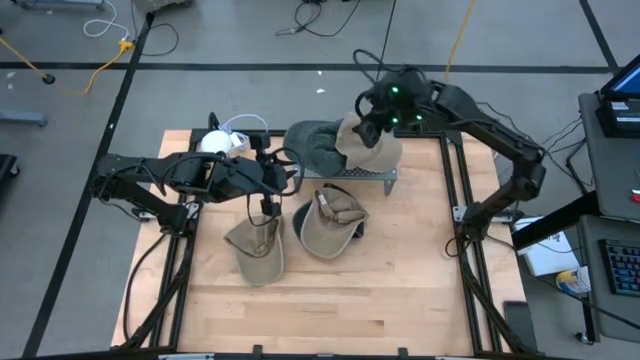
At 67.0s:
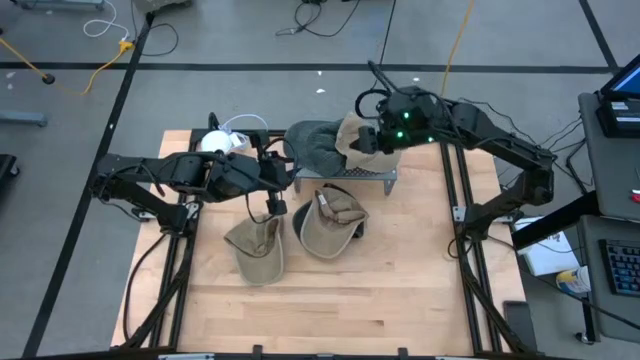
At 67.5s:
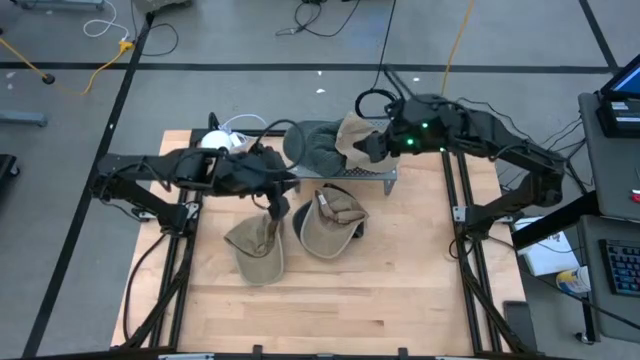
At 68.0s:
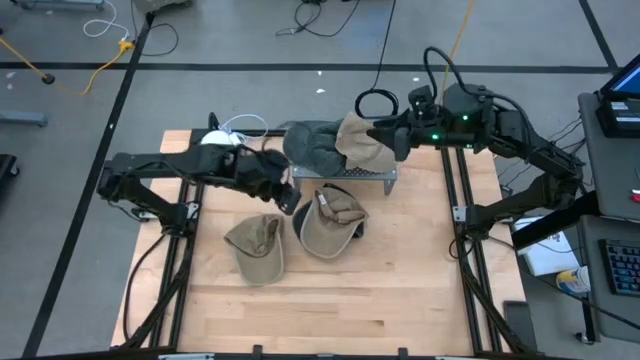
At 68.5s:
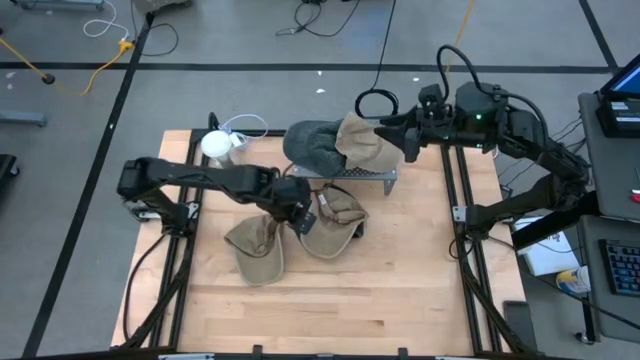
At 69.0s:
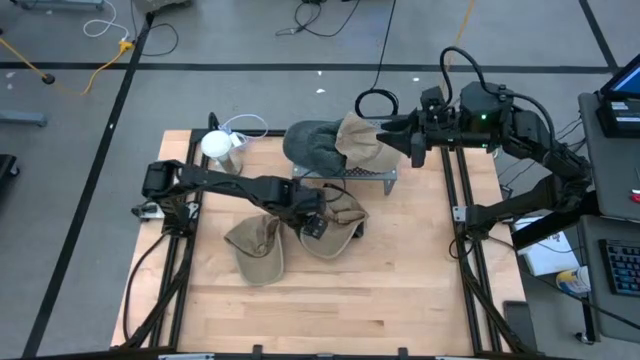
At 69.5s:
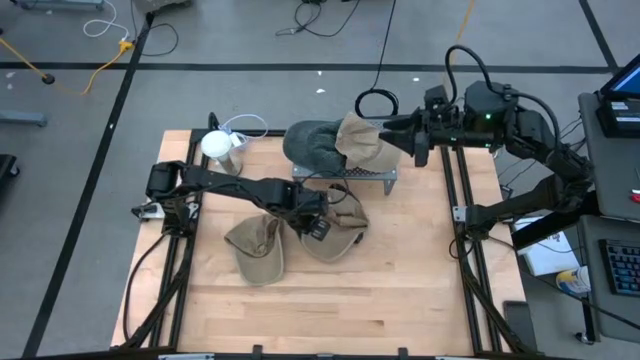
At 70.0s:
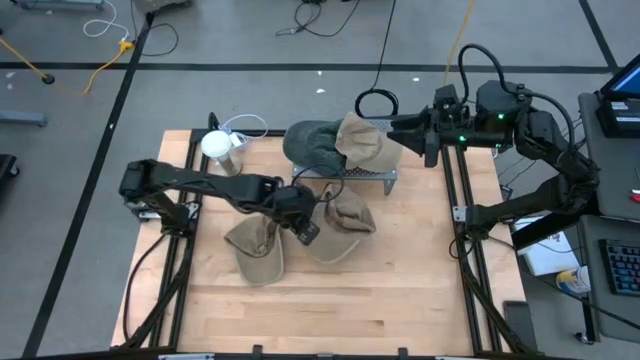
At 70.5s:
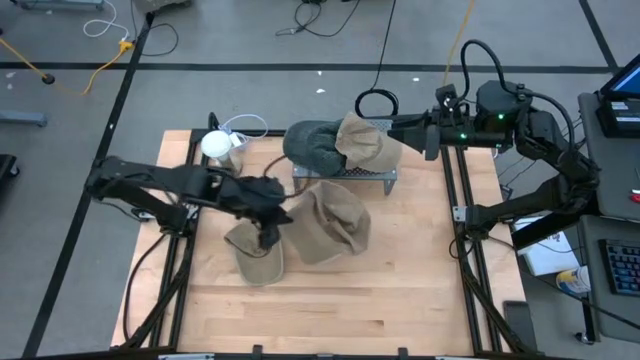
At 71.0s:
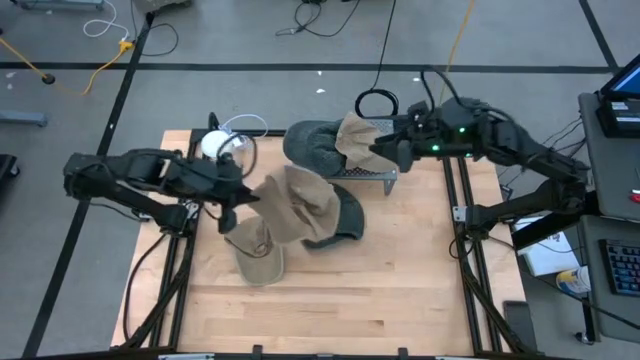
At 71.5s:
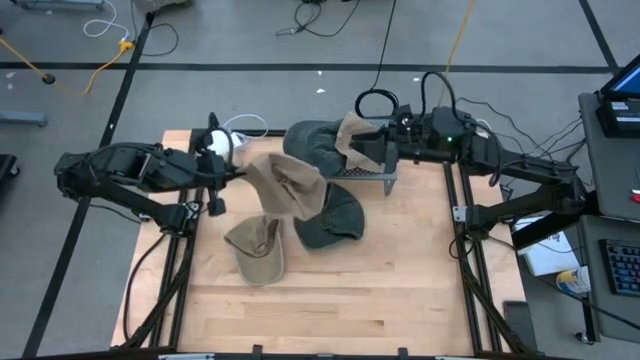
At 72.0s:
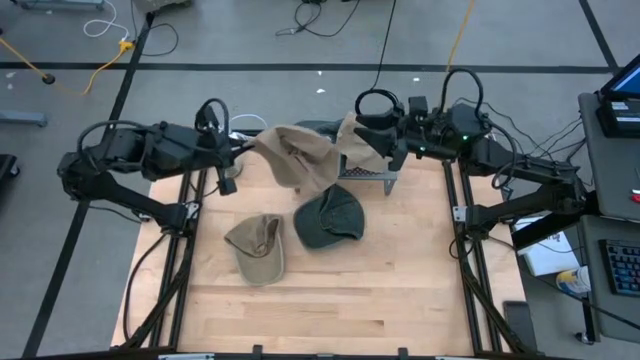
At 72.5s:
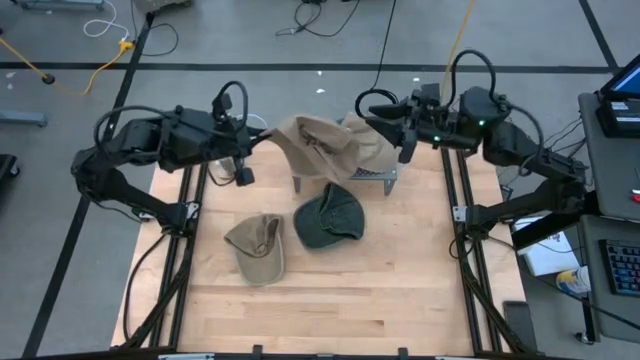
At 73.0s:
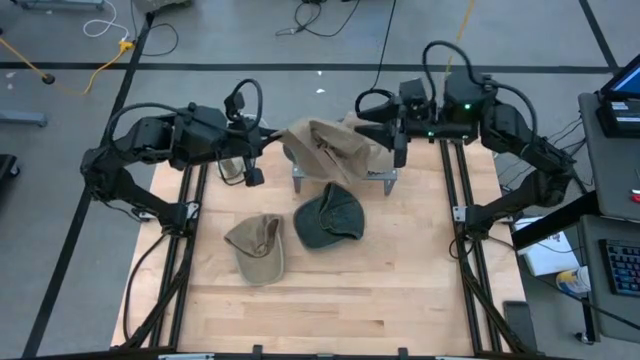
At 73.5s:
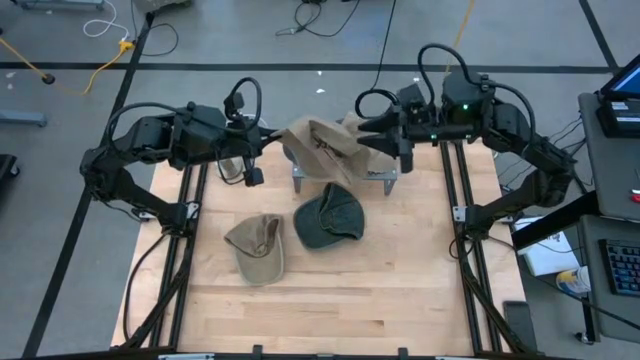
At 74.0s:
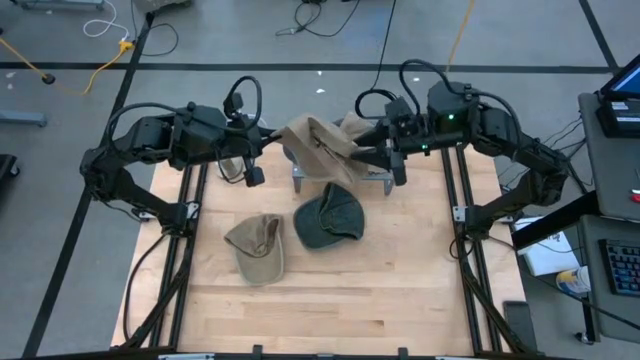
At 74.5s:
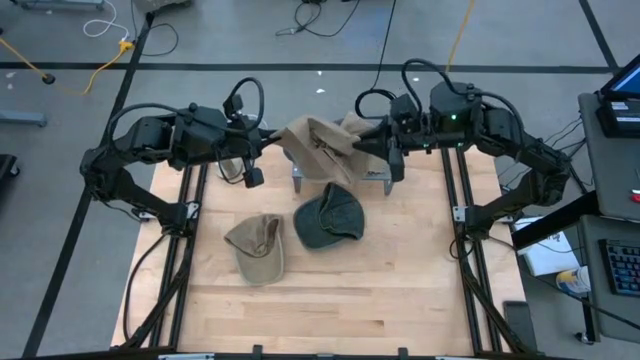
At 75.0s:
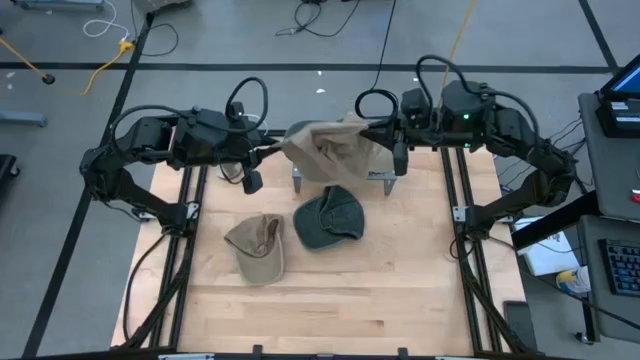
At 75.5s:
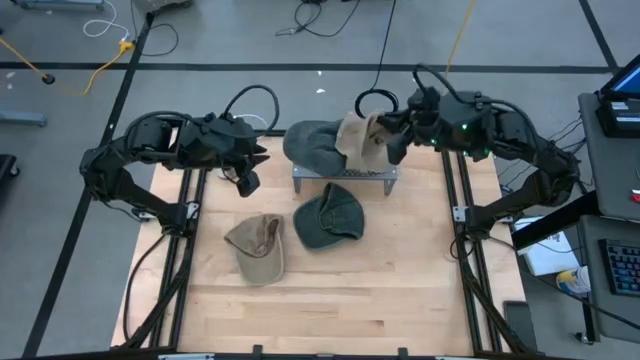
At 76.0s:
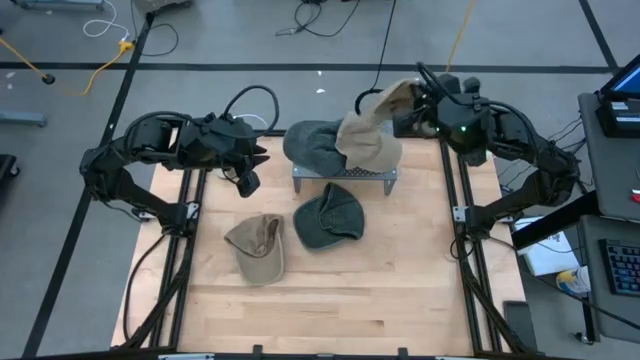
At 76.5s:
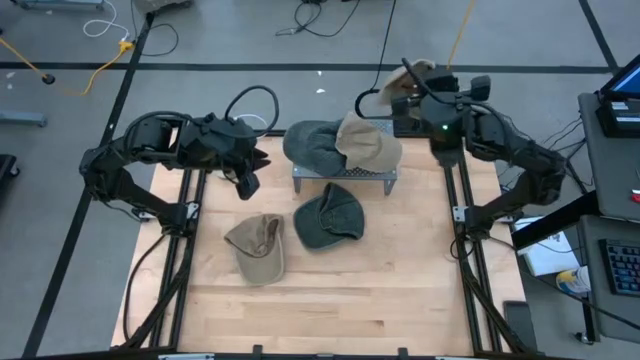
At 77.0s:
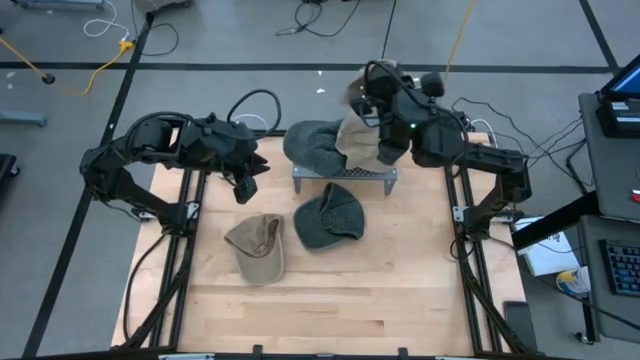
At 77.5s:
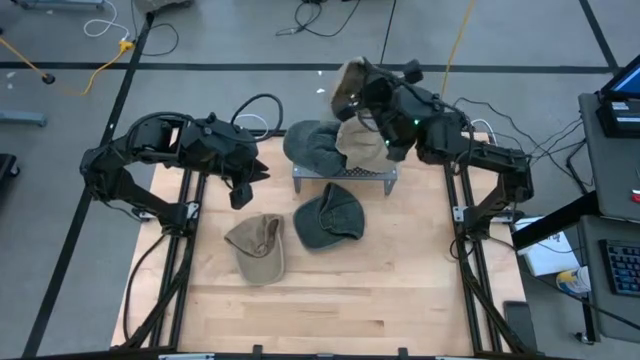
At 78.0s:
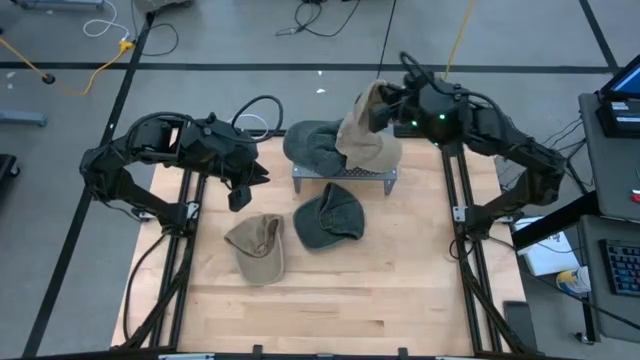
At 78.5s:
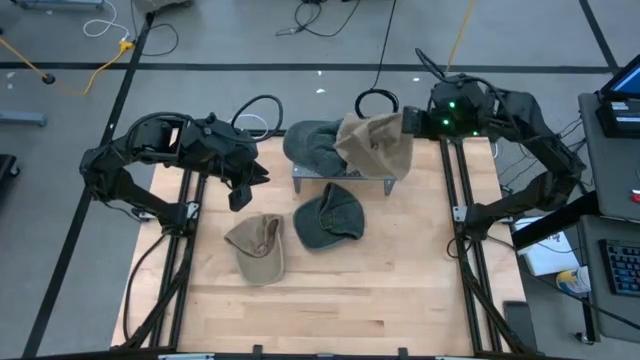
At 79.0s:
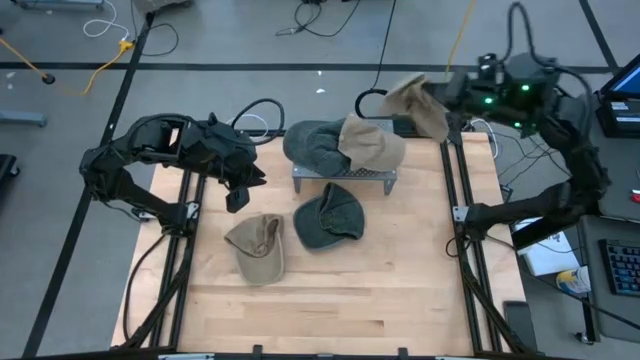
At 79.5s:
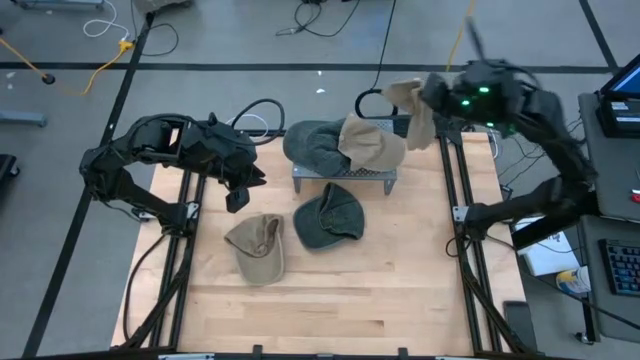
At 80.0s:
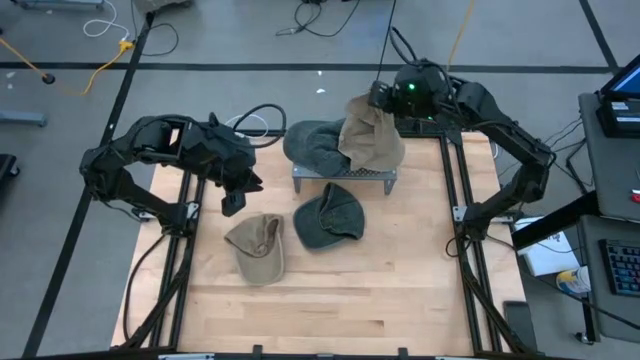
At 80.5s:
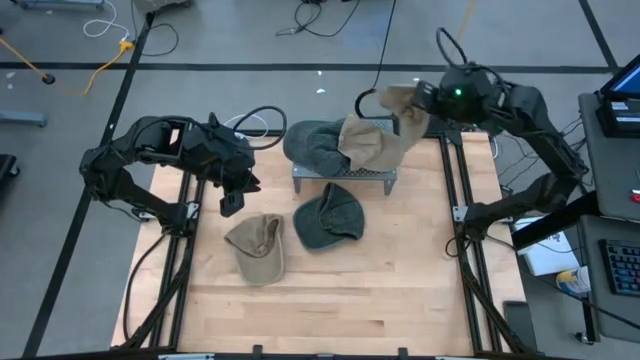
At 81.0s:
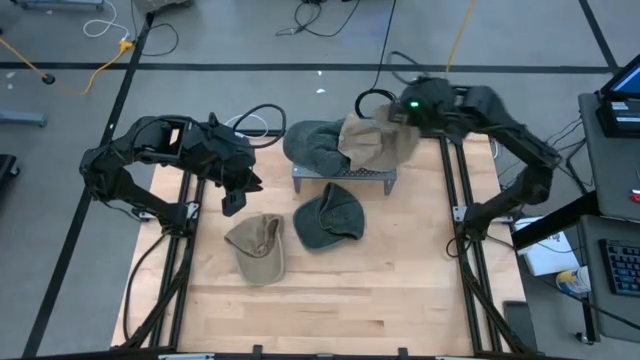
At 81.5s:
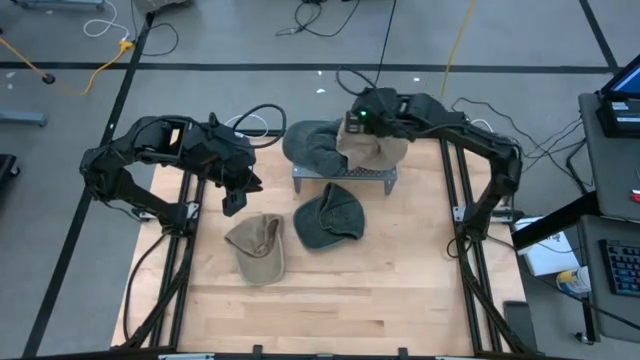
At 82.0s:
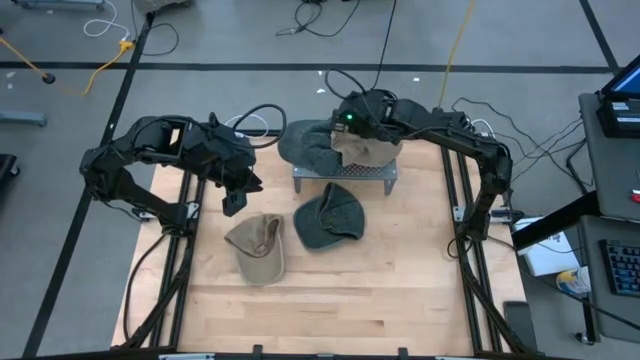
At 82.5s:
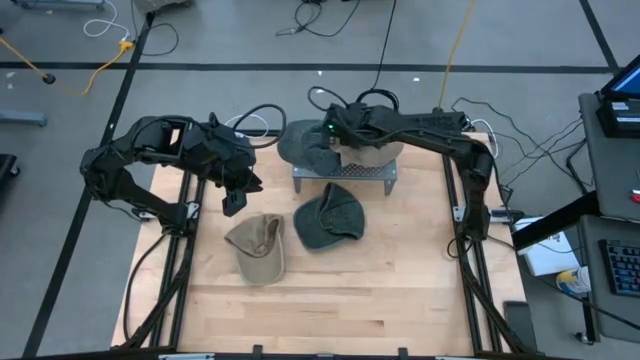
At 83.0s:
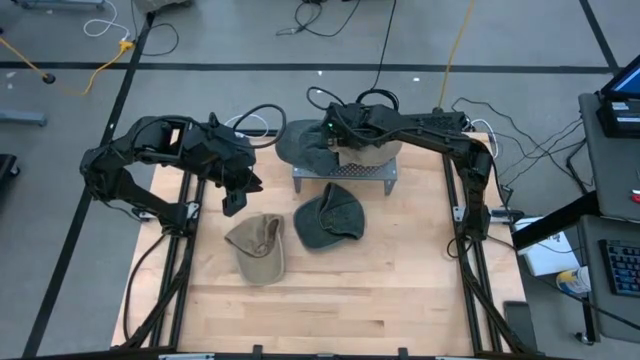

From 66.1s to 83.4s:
Task: Pick & Place hat
Stack the right brown cap on top of the brown cap on the shelf
